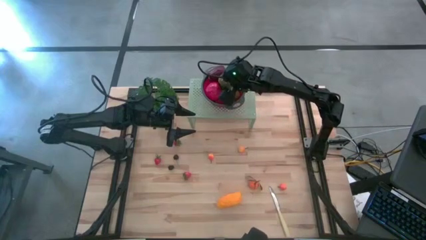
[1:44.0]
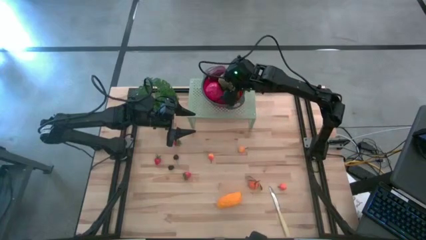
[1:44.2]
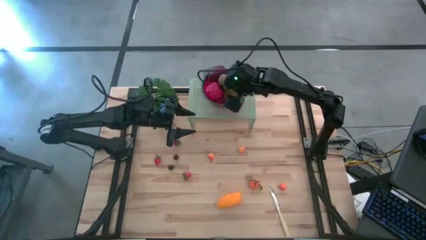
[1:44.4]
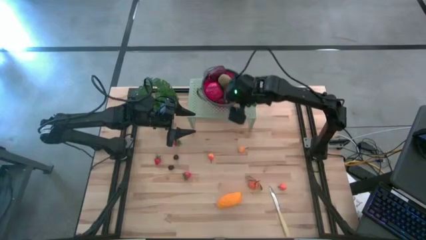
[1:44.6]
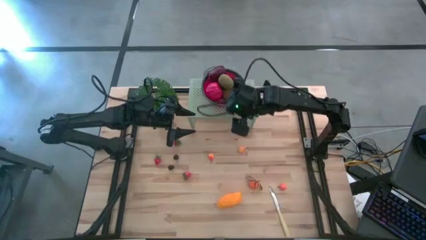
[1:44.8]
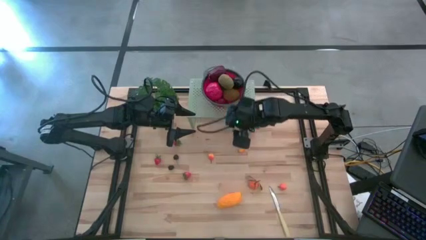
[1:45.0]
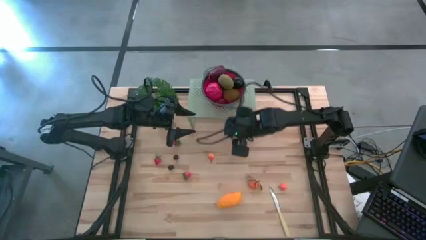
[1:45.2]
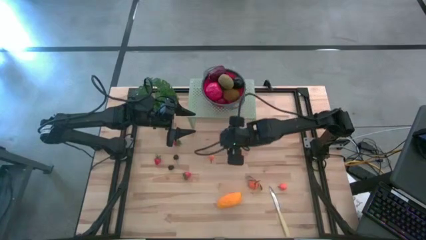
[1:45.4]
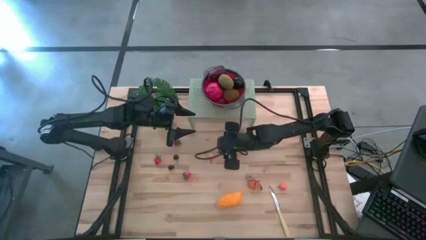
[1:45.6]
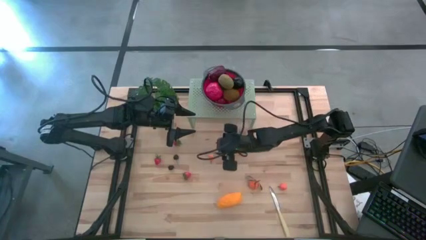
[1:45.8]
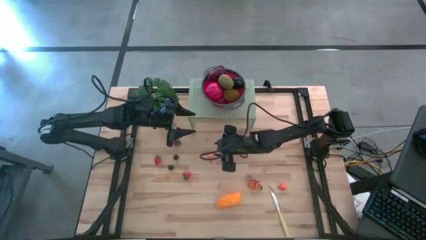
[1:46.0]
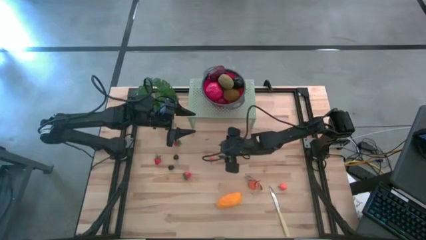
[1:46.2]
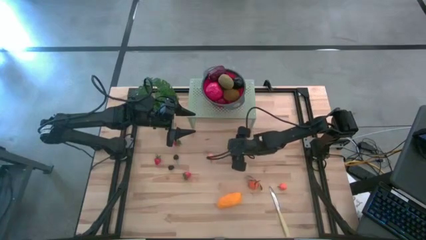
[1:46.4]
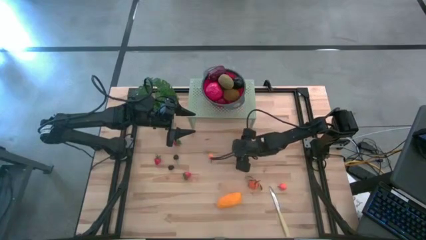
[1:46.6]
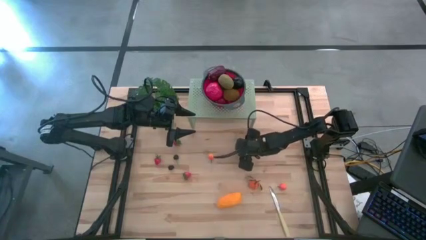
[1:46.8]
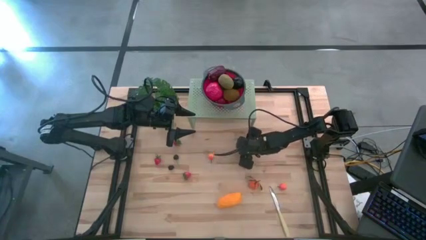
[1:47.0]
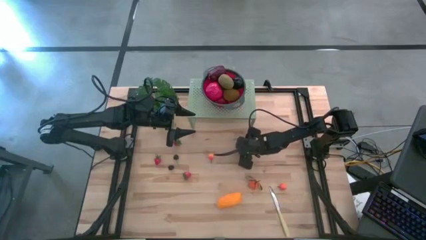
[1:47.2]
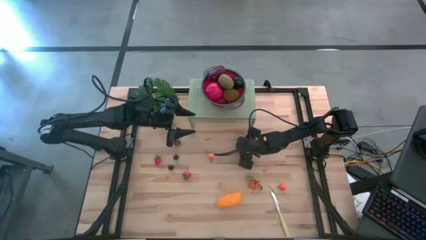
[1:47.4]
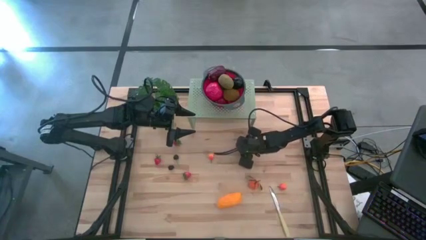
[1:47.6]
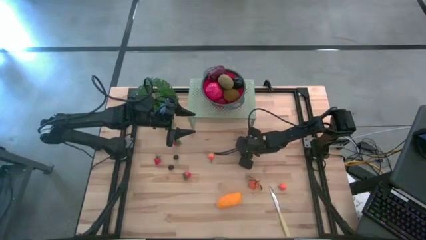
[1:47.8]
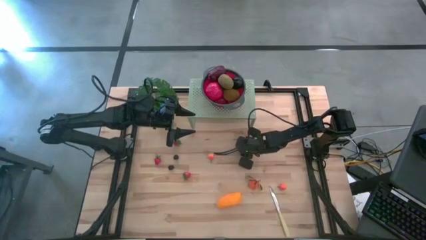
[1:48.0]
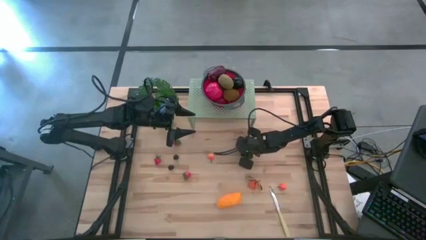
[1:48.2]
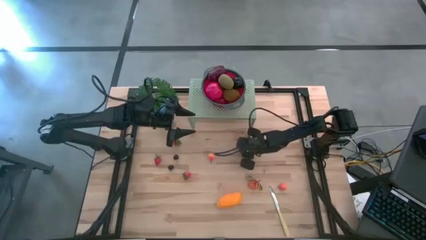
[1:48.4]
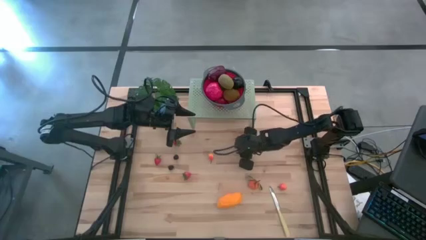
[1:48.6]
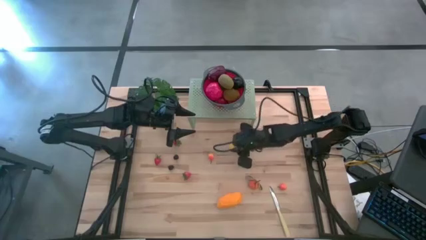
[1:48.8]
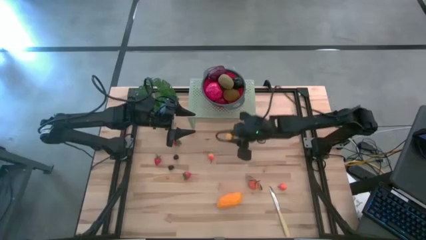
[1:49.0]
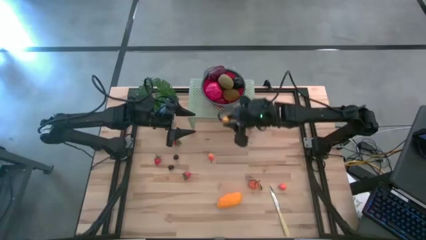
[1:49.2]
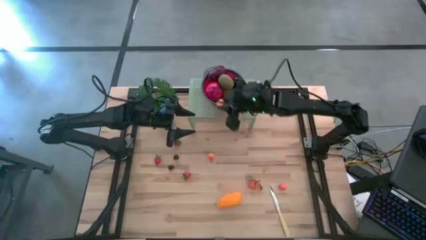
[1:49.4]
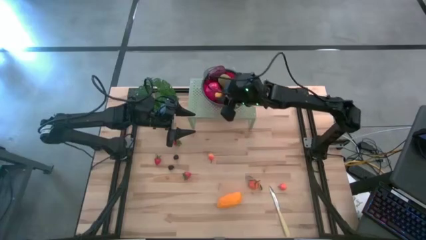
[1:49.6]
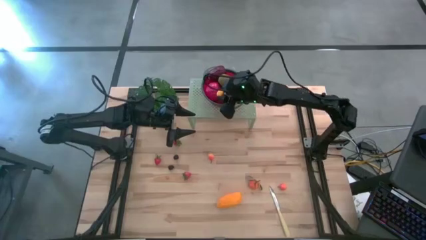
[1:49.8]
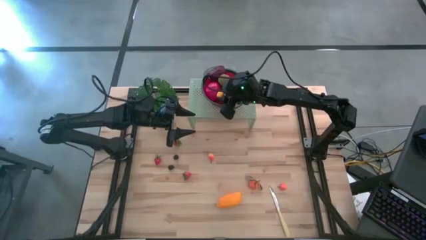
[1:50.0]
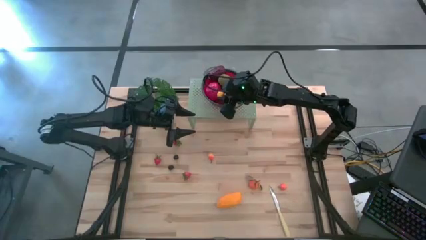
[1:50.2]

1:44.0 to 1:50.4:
Task: Pick & Place Fruit
Put the peach into the red strainer bowl on the shelf

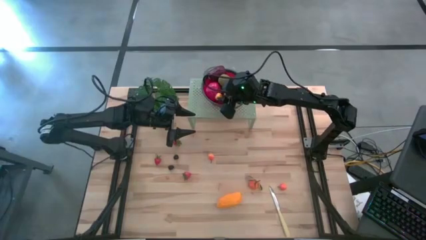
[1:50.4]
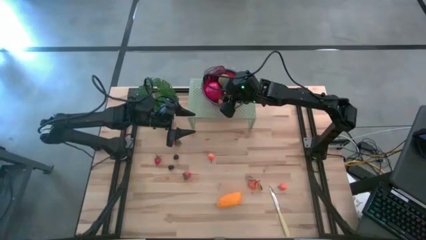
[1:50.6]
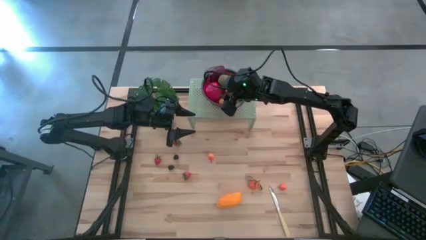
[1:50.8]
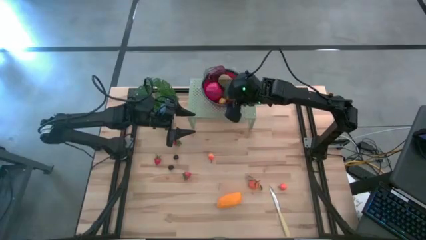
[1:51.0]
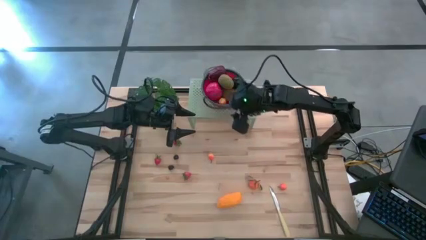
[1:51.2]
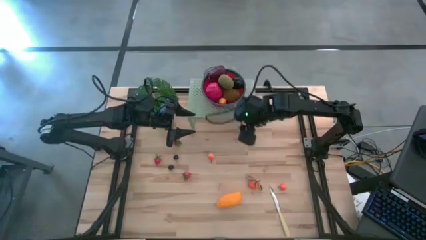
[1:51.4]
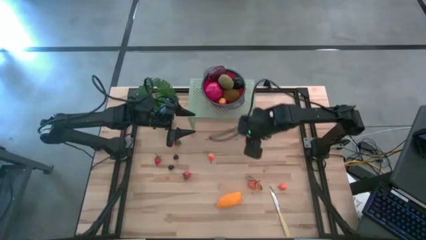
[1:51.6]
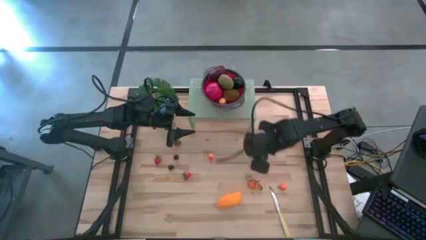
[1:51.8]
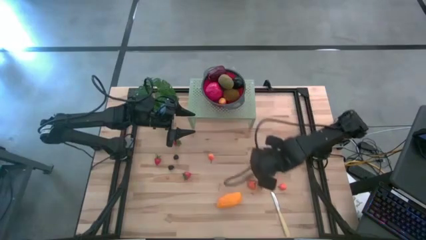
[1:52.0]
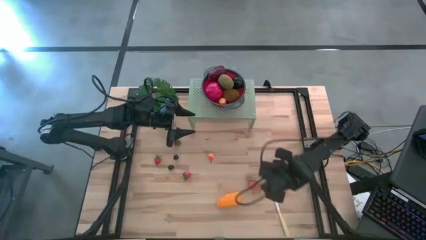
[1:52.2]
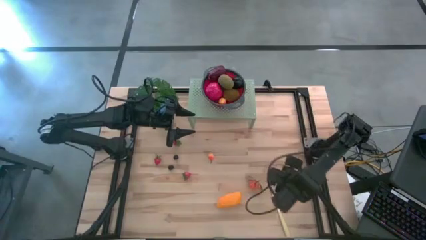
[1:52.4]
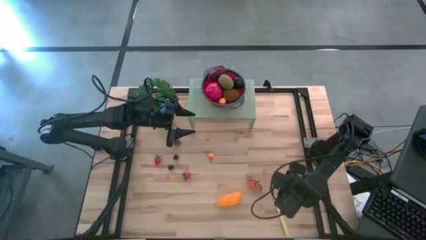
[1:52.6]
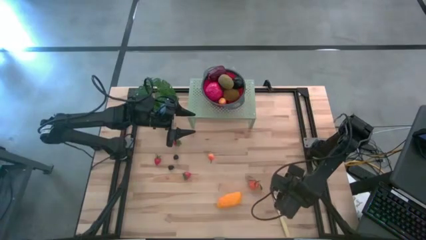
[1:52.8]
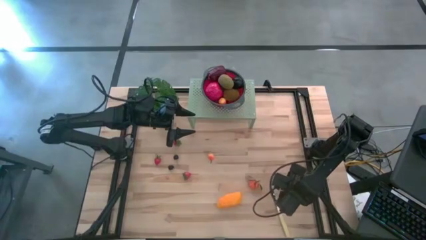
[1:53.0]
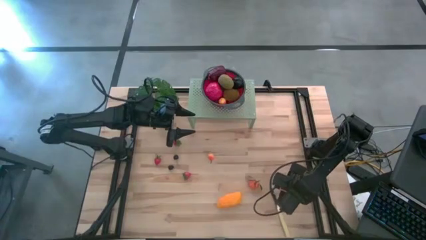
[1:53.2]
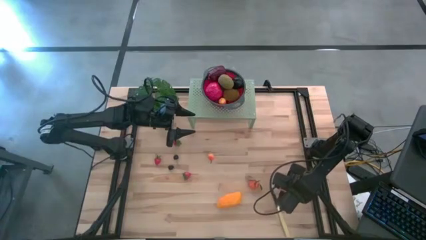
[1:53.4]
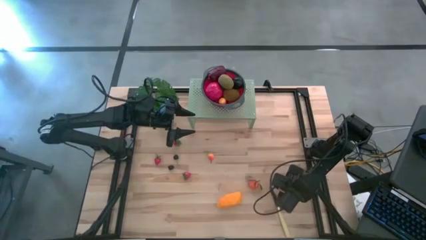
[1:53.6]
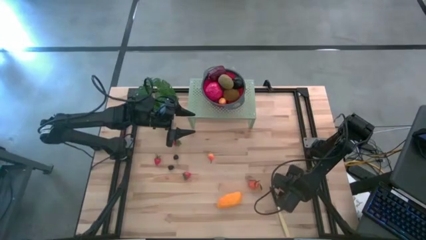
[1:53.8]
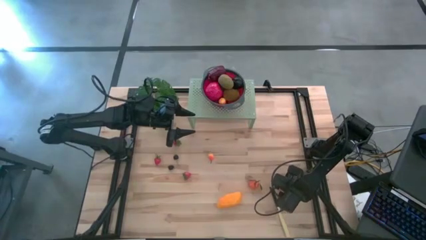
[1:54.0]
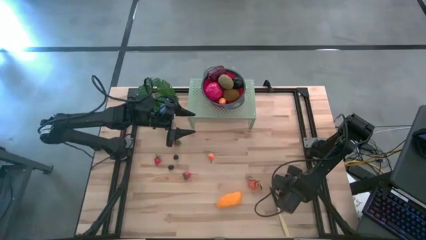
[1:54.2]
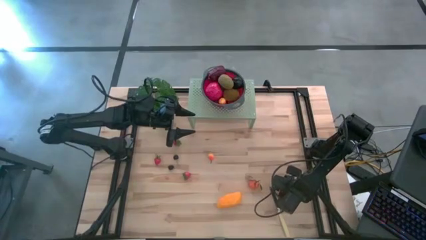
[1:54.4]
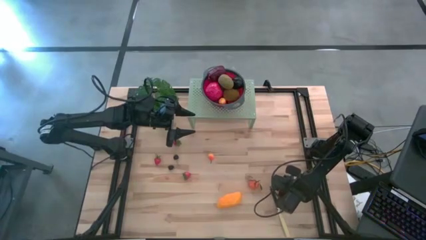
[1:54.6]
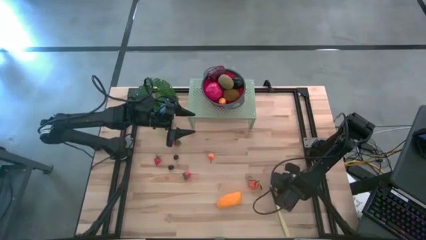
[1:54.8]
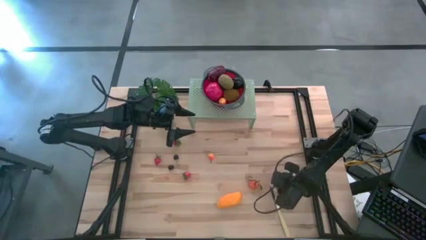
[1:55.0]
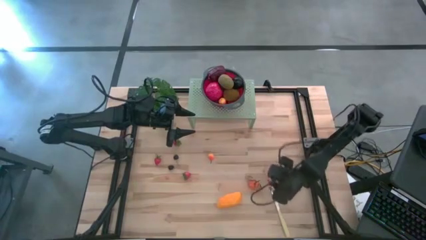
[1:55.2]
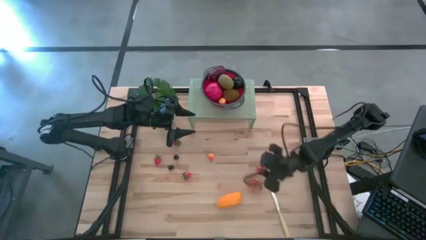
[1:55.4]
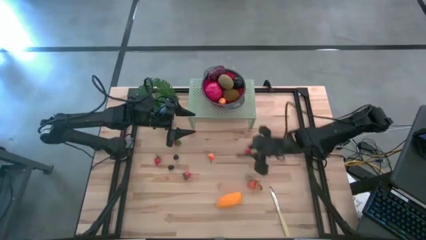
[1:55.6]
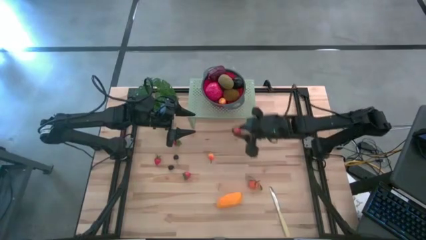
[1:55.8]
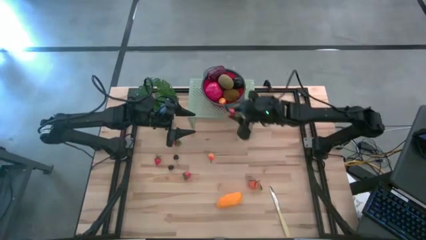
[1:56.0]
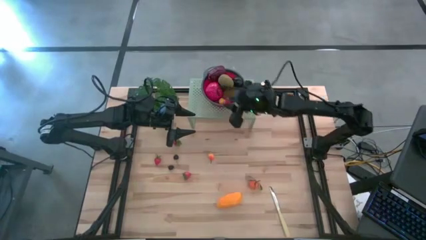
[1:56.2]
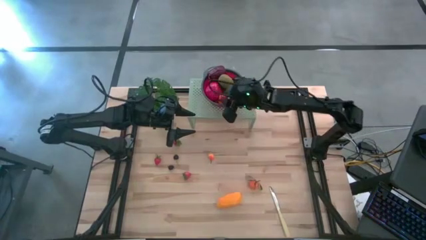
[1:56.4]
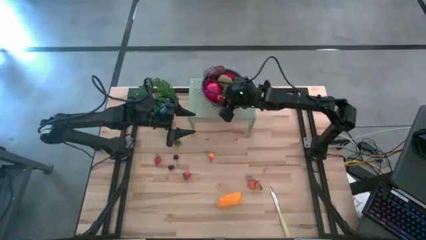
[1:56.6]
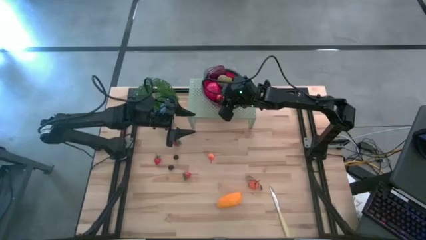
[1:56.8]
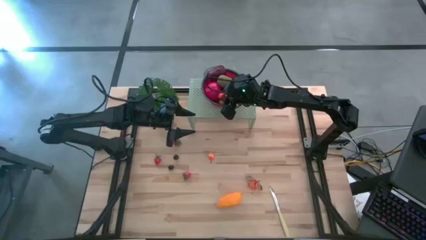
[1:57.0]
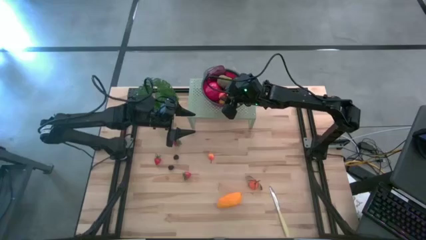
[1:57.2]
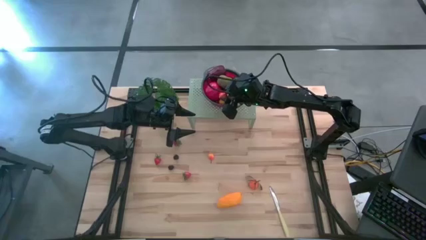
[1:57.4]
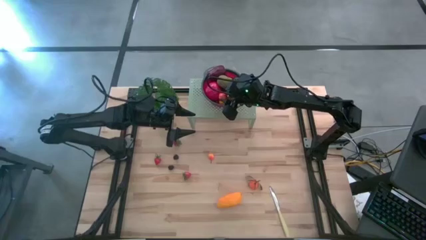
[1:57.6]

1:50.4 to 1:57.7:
Put the peach into the red strainer bowl on the shelf

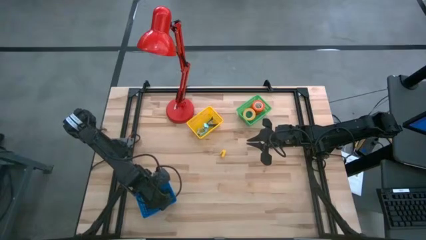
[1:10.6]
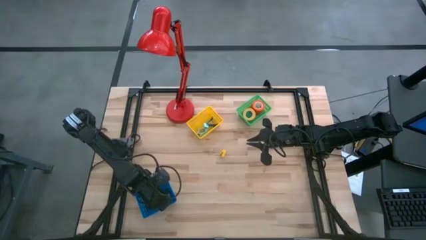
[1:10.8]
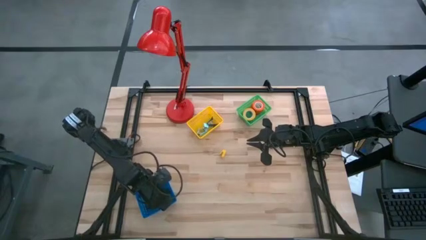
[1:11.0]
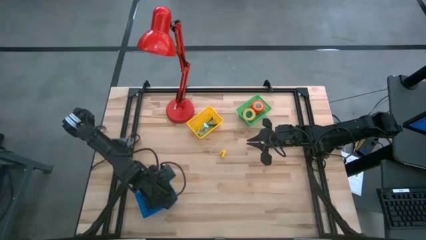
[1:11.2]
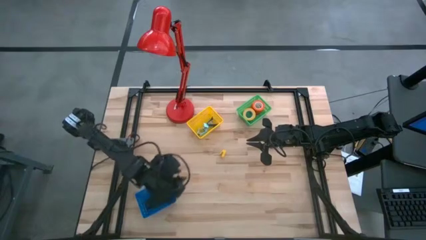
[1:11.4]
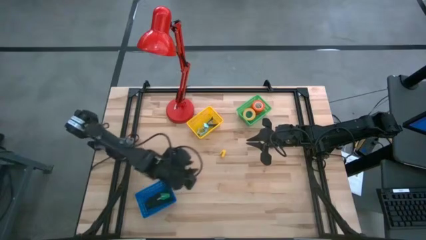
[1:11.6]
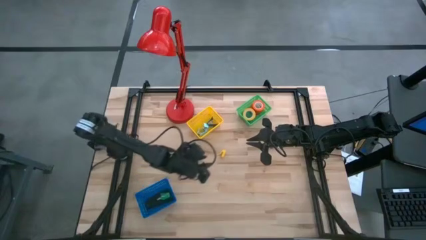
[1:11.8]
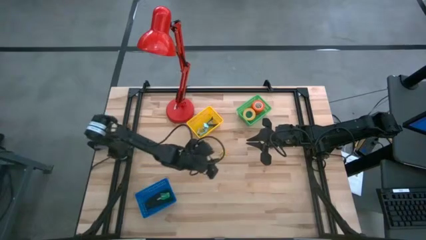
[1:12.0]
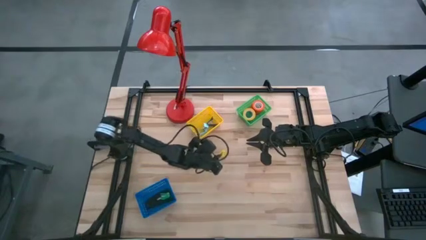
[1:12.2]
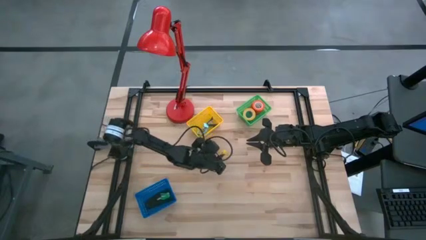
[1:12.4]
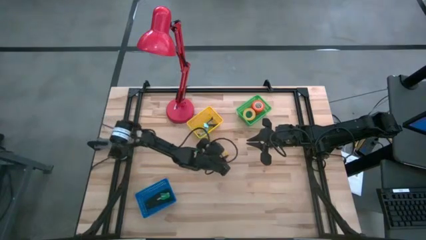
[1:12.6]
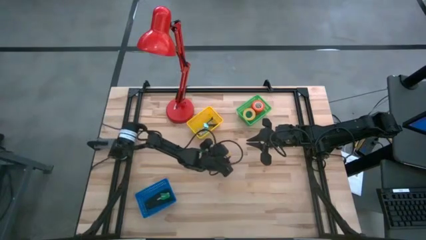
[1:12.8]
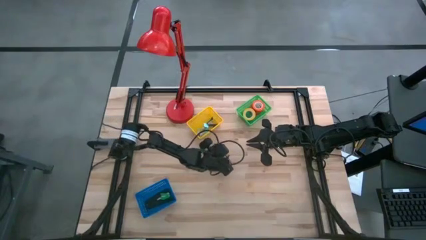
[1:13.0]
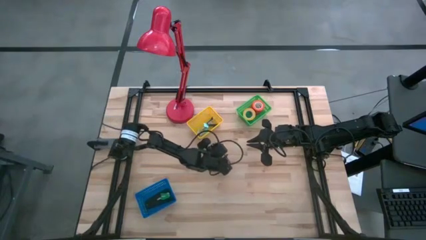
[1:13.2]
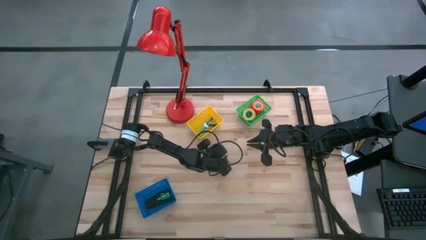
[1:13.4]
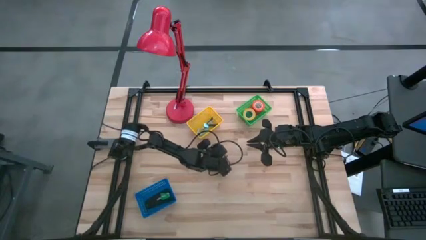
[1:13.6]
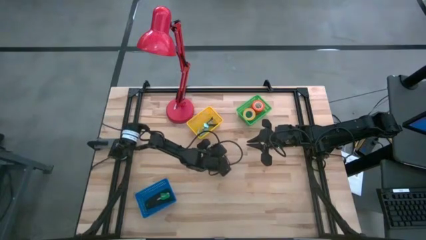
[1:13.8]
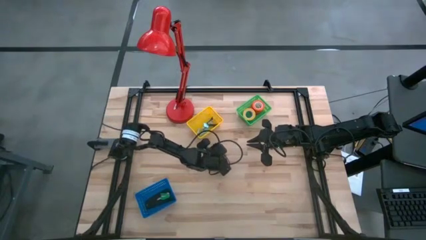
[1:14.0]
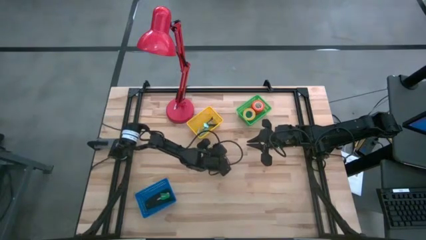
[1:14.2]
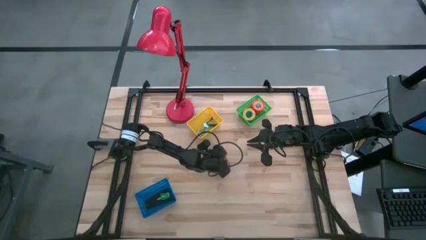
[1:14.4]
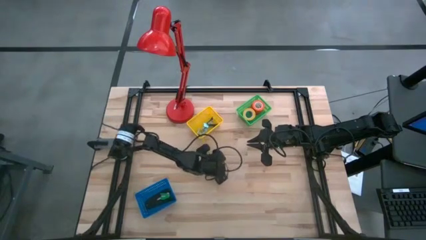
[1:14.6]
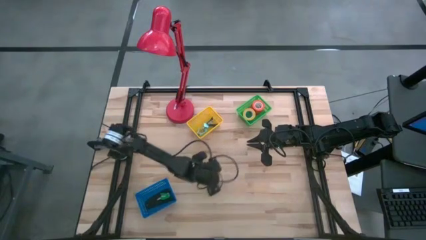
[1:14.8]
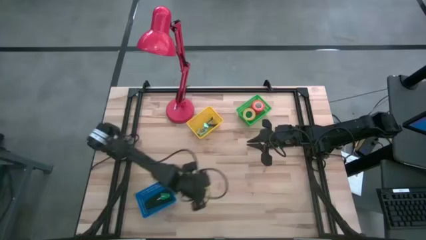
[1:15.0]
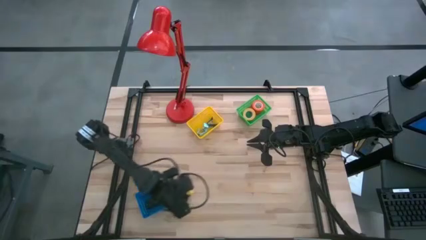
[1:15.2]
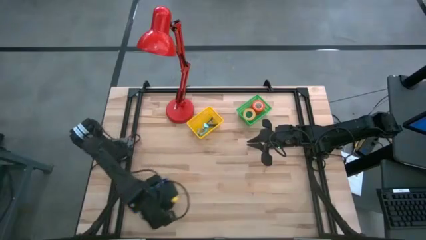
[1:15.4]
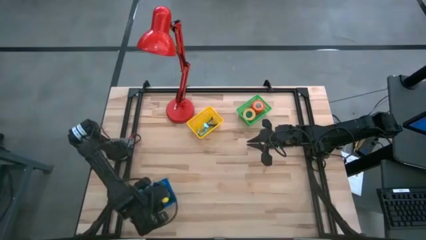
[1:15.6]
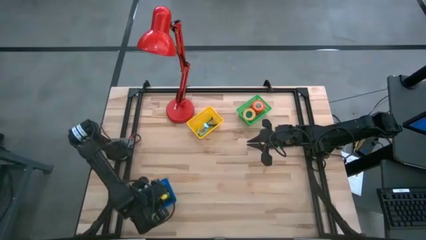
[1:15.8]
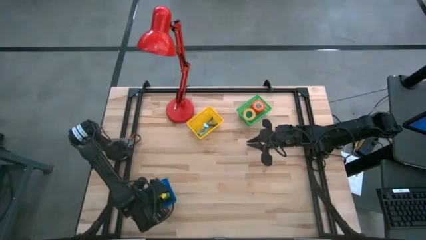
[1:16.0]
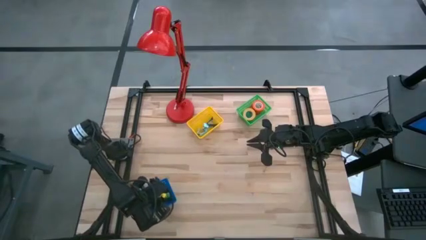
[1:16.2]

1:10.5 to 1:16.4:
Task: Pick and place Stapler, Stapler remover, tape
Put the small yellow stapler into the blue bin
